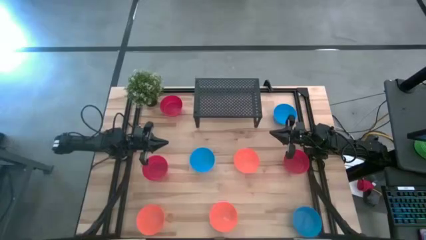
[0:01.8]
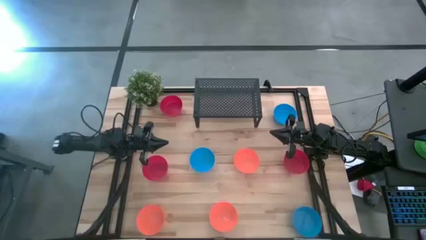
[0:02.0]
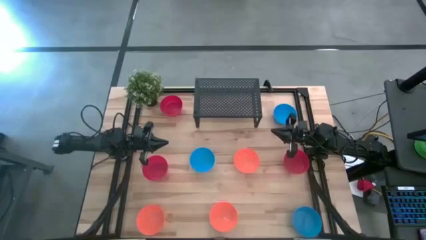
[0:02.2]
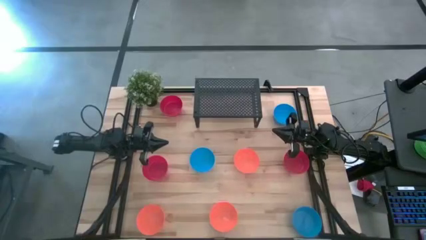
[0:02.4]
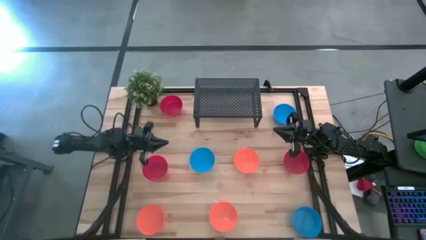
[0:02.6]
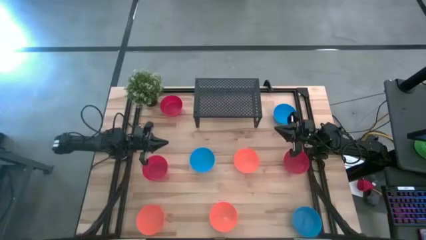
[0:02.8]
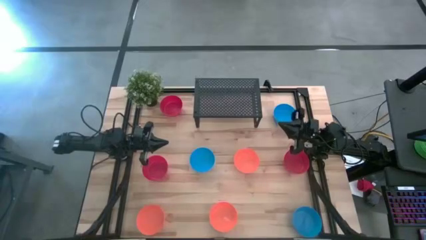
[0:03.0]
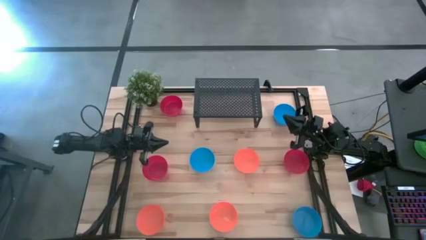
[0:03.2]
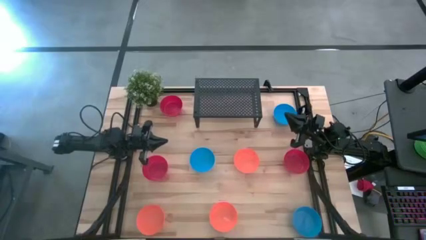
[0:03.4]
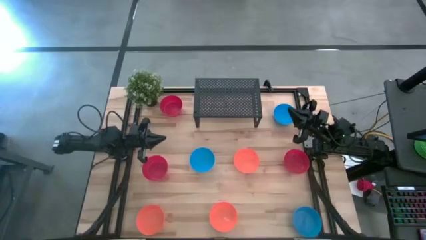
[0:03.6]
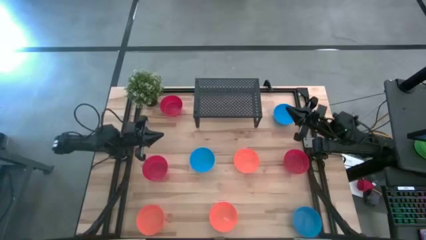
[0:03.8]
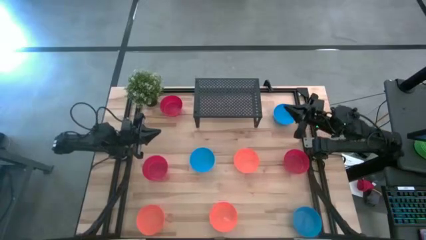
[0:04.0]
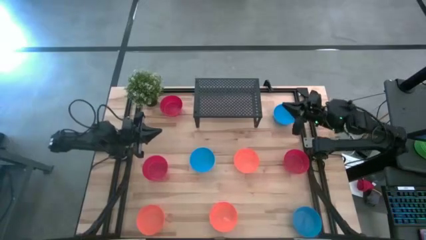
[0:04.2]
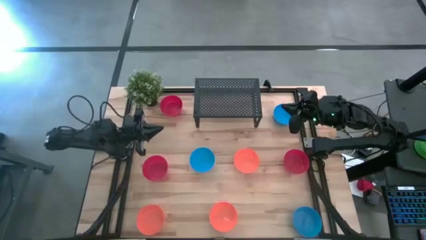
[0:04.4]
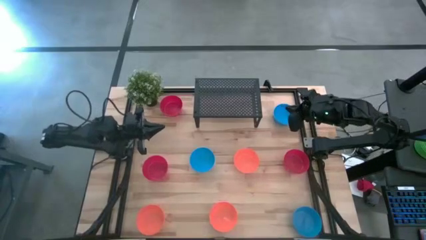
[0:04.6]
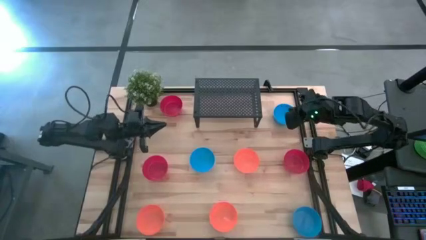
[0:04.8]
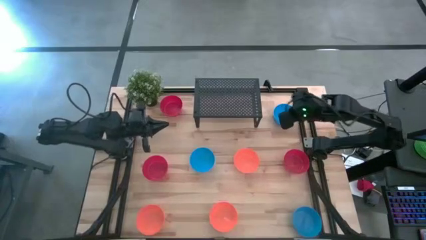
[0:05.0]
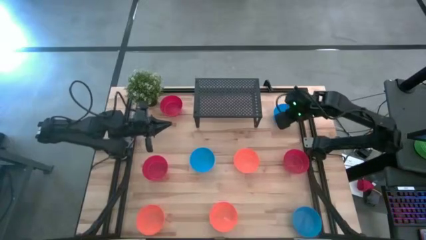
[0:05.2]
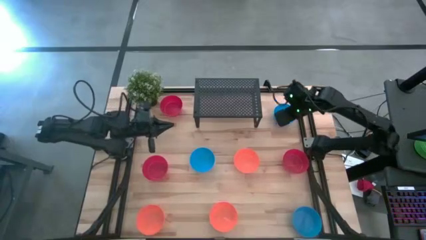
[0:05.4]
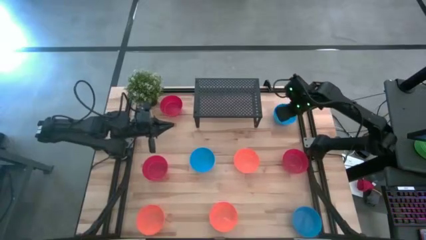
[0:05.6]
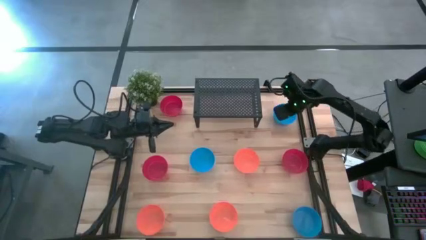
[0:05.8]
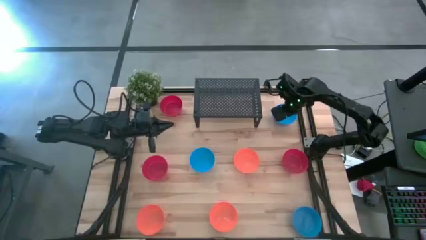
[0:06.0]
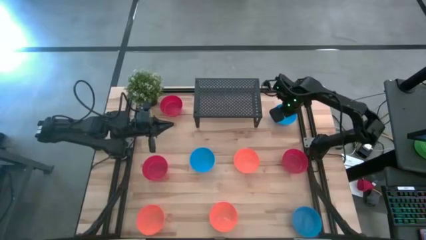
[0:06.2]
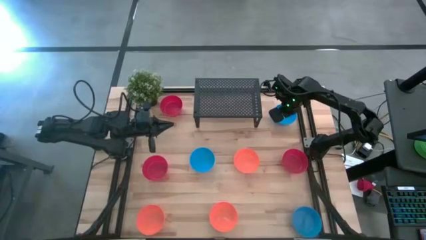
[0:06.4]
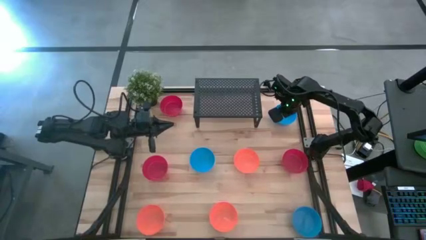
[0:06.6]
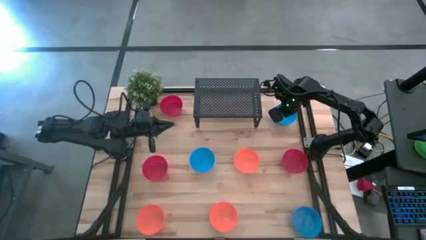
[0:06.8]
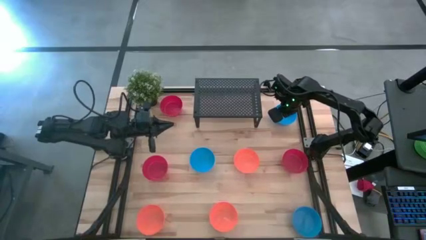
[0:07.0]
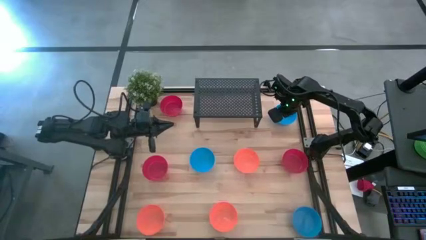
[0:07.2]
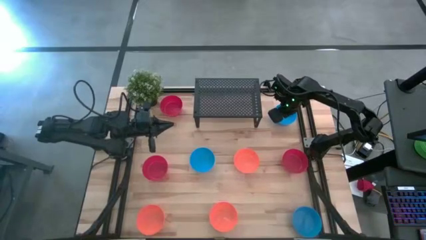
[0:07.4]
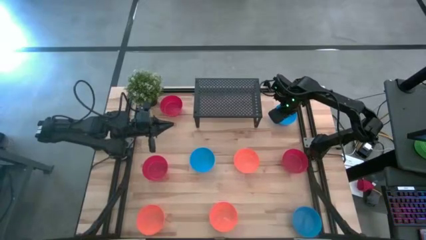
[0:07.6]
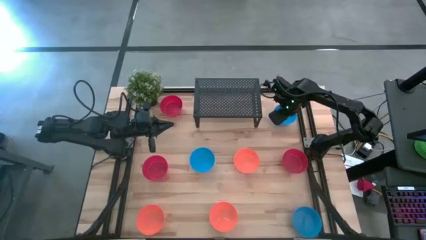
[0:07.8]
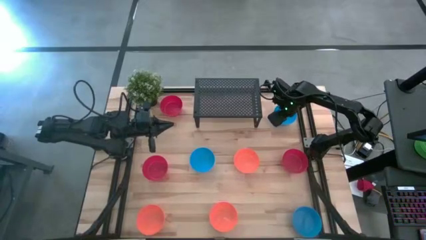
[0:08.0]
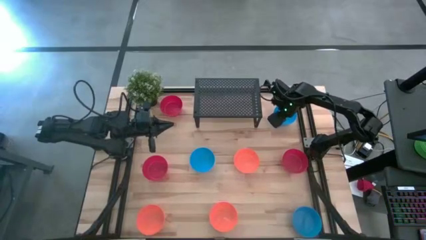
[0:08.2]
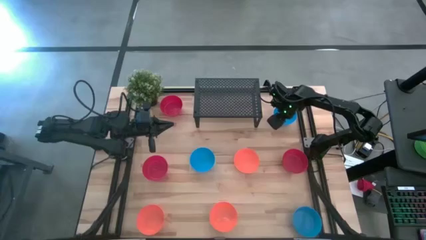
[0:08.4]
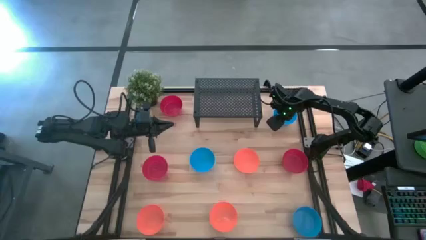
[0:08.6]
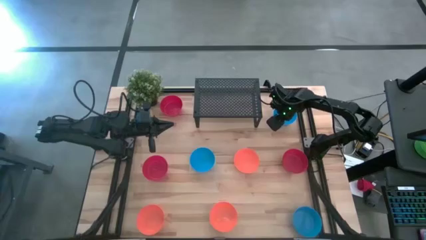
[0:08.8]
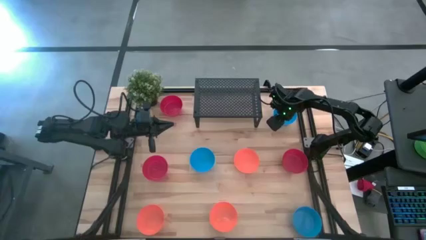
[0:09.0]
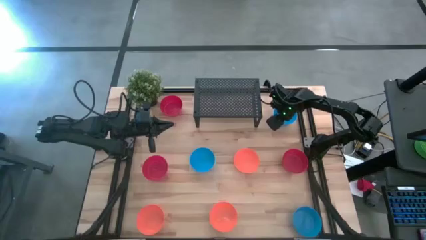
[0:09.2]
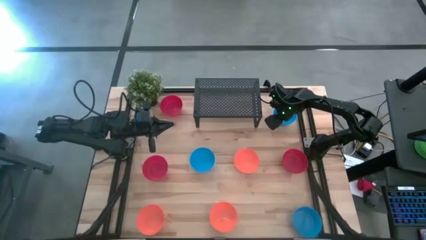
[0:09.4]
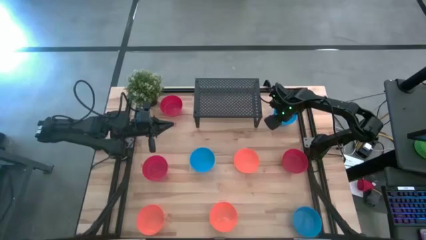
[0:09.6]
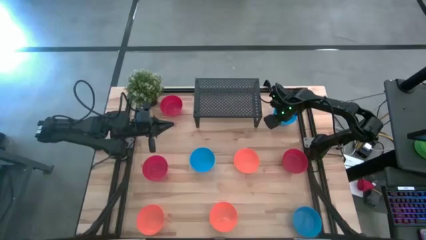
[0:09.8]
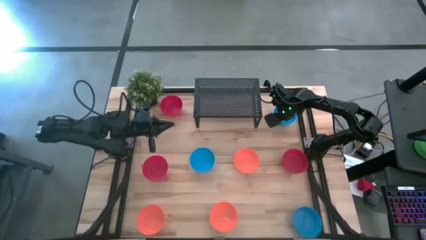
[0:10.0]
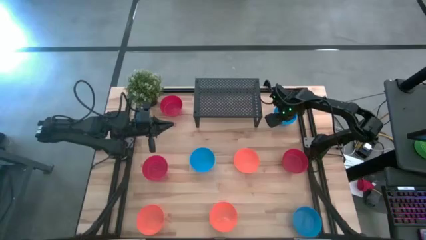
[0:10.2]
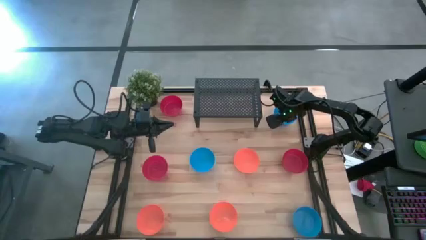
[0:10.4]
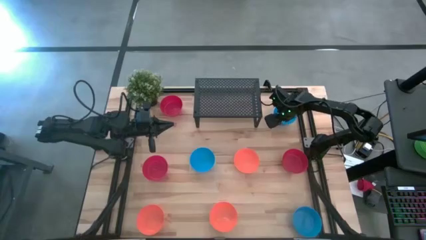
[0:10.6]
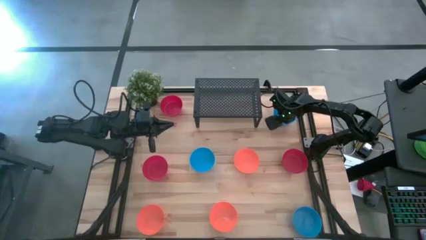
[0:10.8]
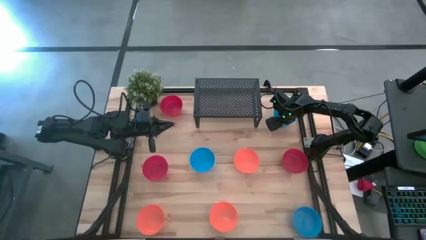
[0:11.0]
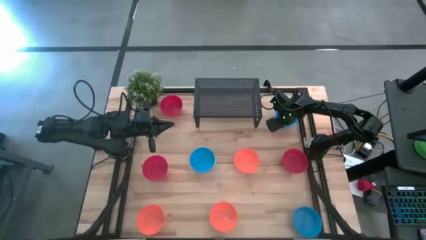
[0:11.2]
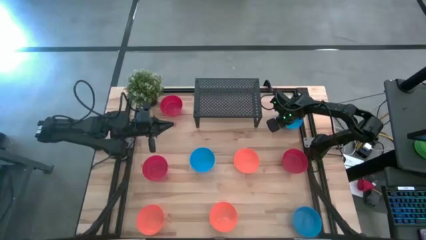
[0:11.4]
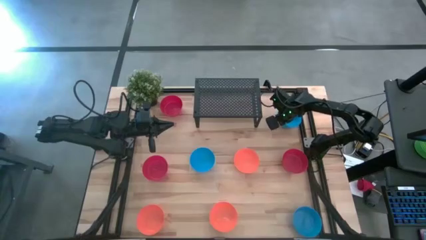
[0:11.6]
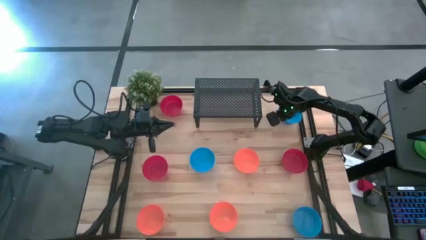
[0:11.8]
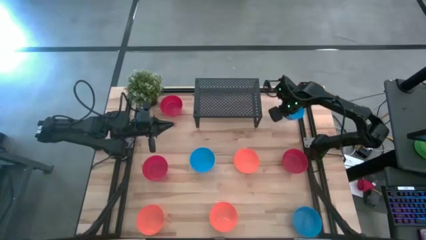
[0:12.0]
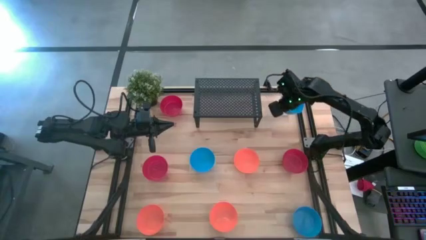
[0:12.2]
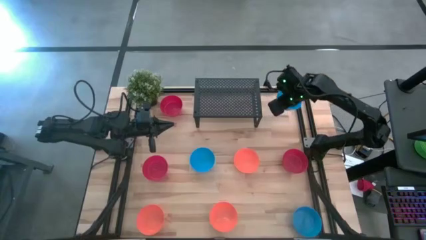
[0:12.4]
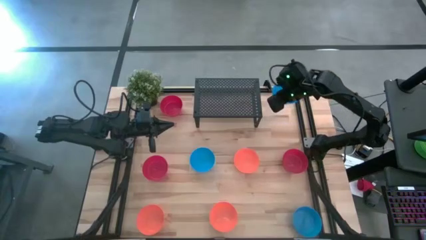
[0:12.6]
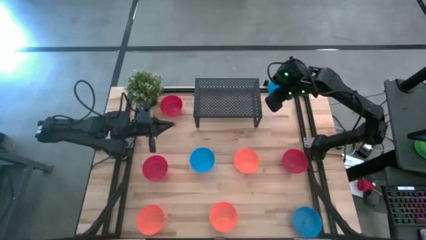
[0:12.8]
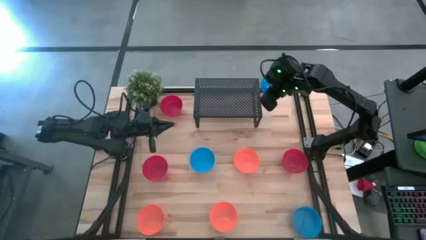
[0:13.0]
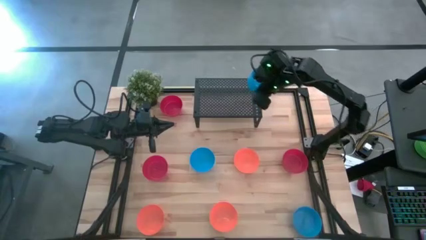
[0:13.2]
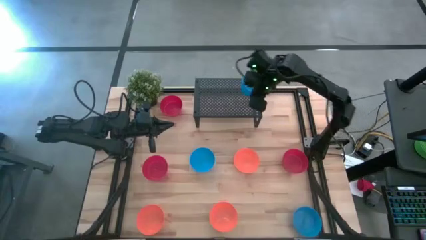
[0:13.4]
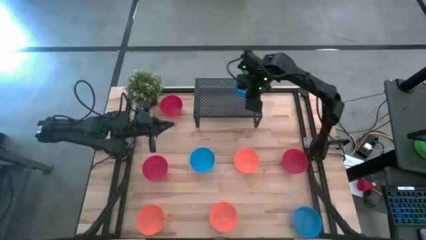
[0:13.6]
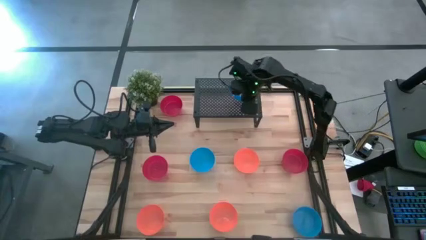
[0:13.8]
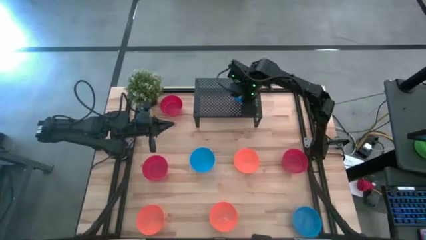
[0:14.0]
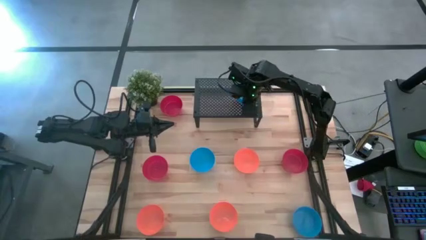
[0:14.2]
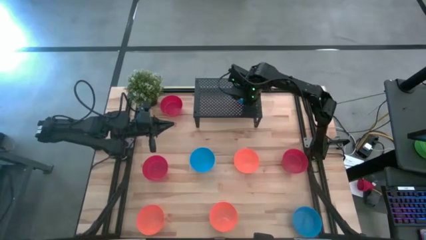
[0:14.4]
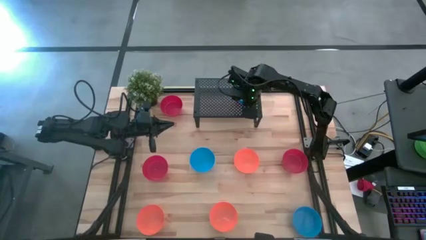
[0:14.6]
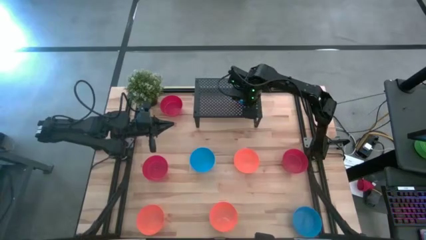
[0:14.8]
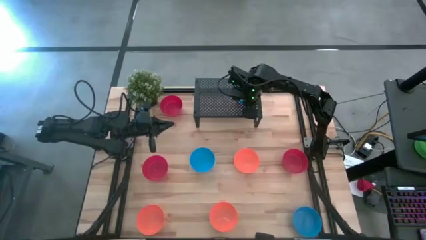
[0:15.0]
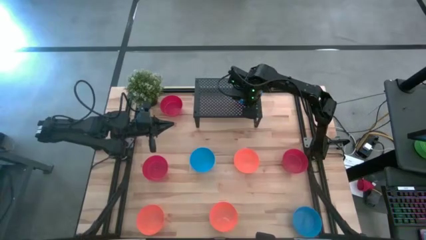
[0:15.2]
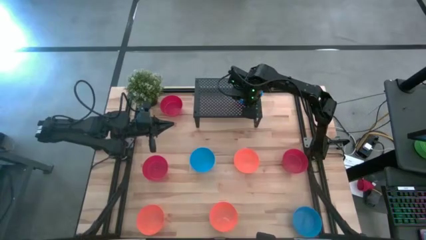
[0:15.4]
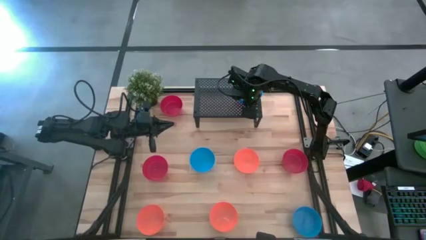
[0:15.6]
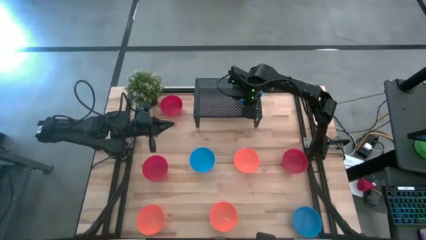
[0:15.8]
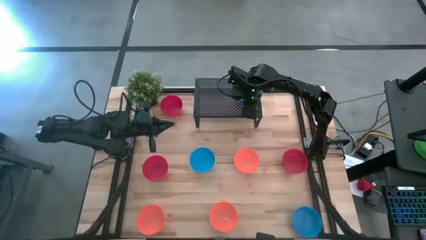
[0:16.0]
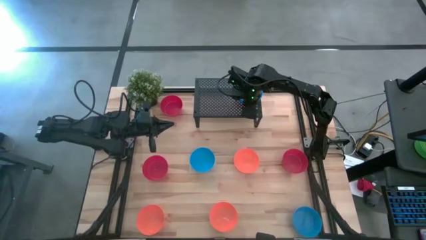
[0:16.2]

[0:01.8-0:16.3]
Task: Pick & Place Mini bowls
Put the top blue bowl on the shelf
